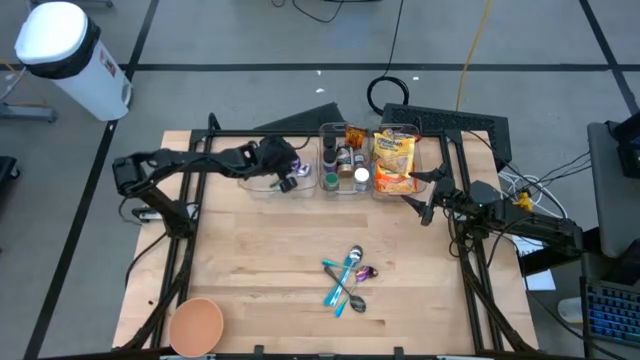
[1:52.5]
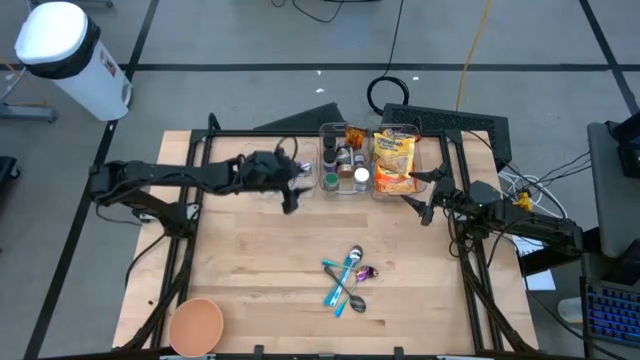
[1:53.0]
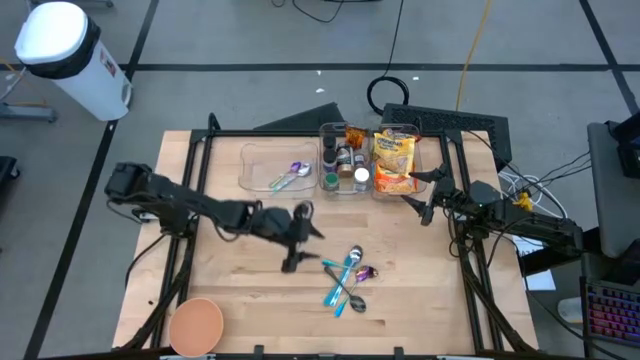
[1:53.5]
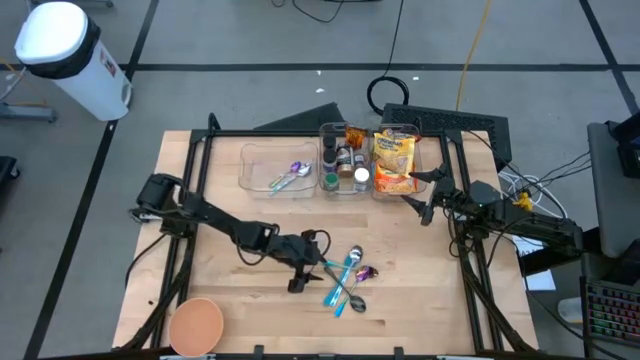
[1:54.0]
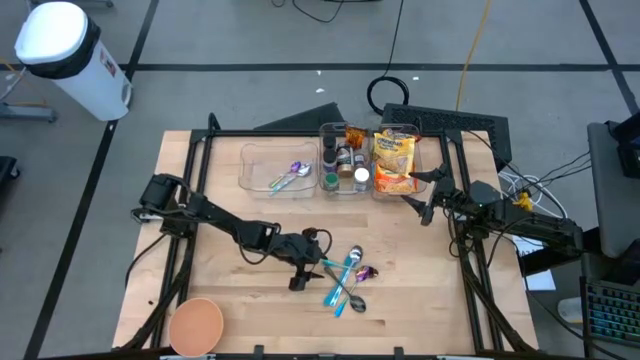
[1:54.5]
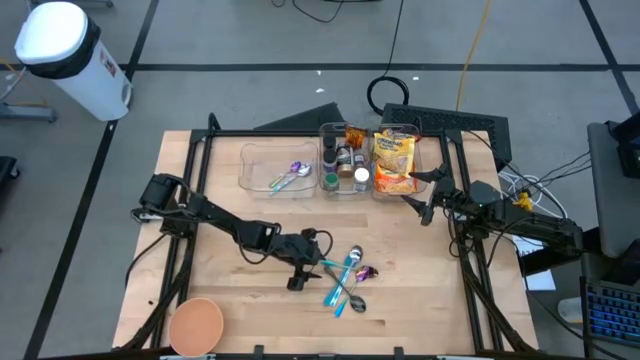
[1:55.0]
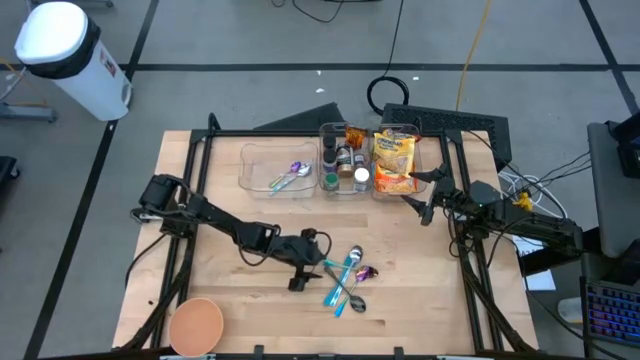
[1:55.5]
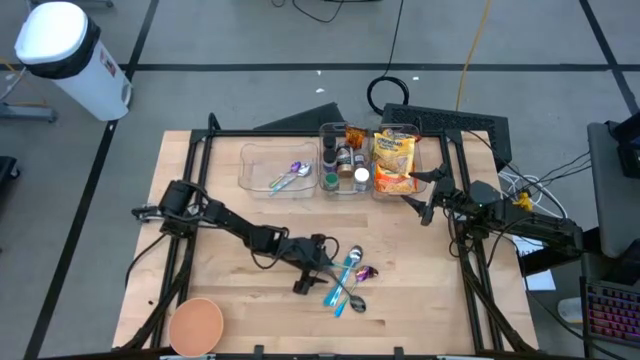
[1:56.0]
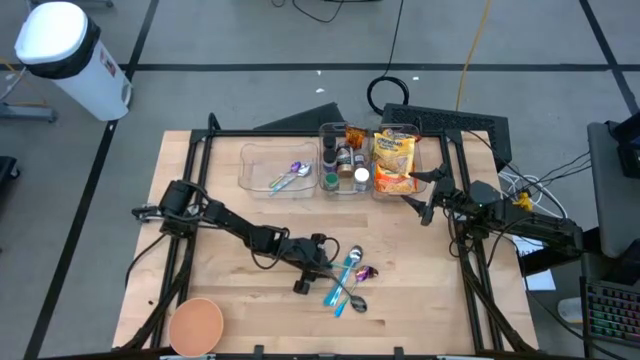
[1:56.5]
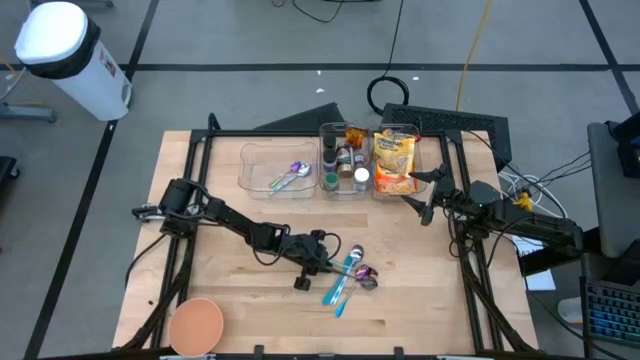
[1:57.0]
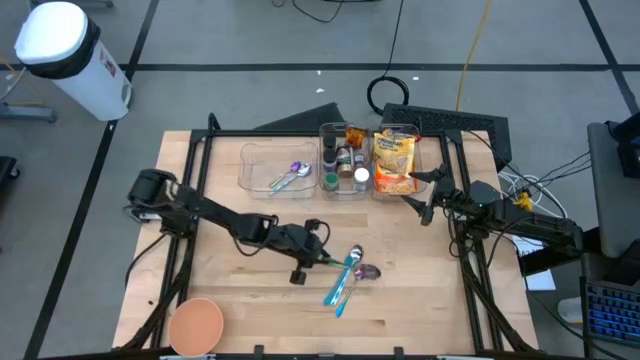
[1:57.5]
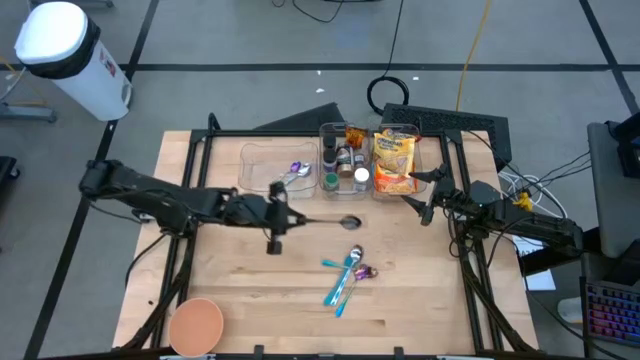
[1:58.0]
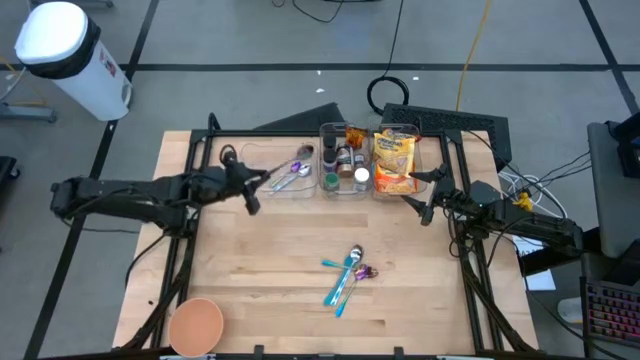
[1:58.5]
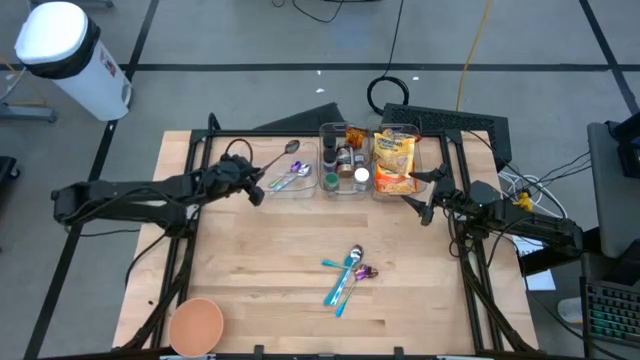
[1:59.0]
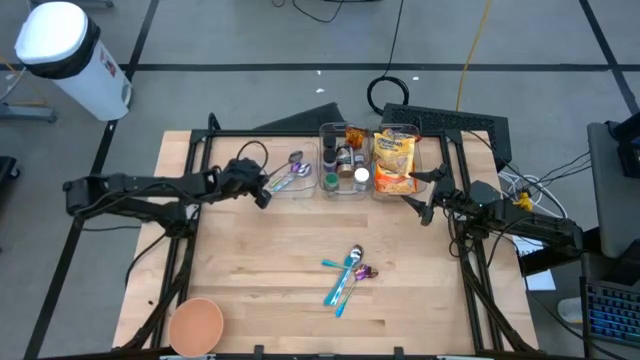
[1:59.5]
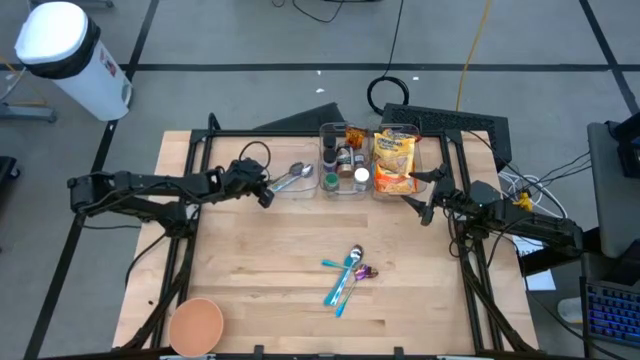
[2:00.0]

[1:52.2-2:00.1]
Task: Pick & Place Food Item
Put the black spoon into the left transparent bin

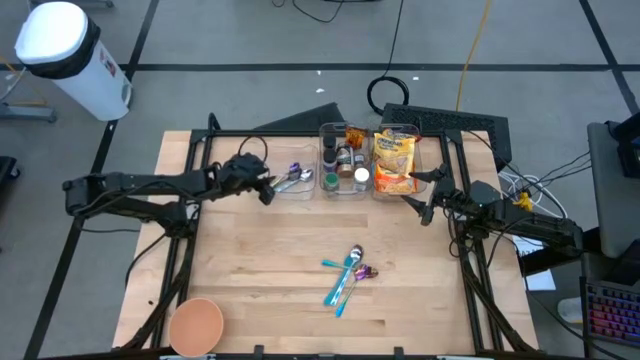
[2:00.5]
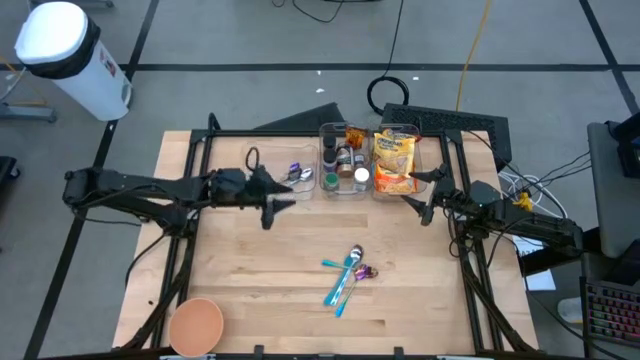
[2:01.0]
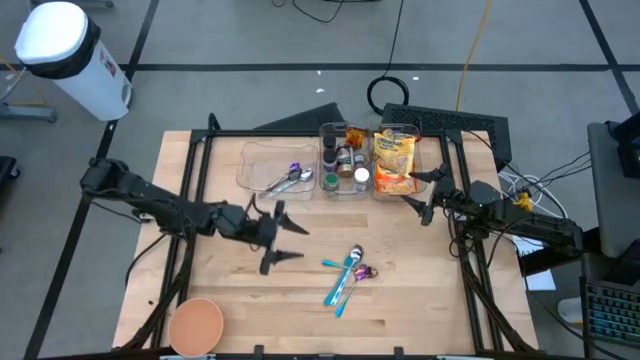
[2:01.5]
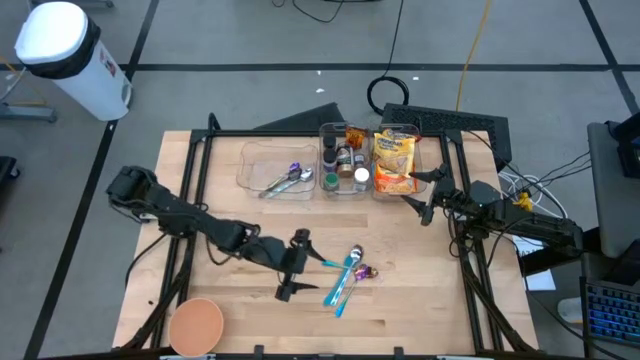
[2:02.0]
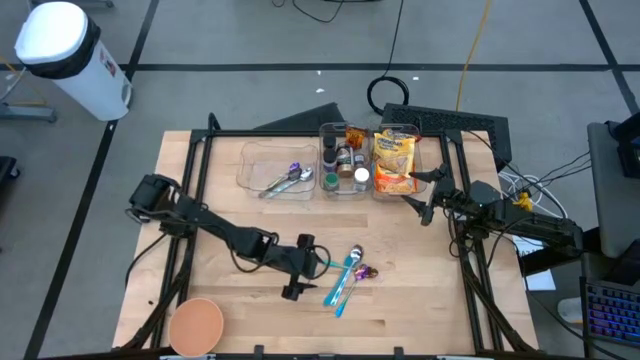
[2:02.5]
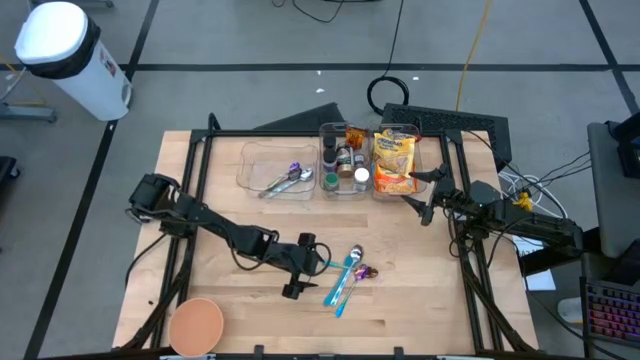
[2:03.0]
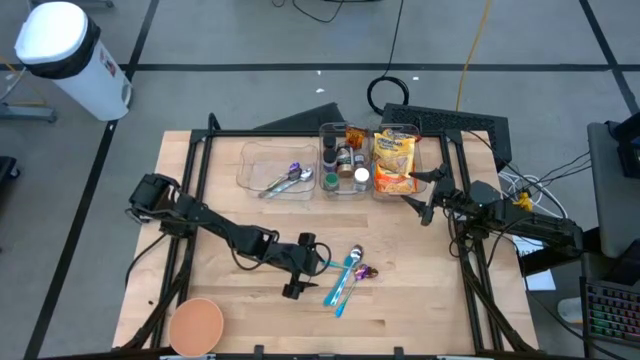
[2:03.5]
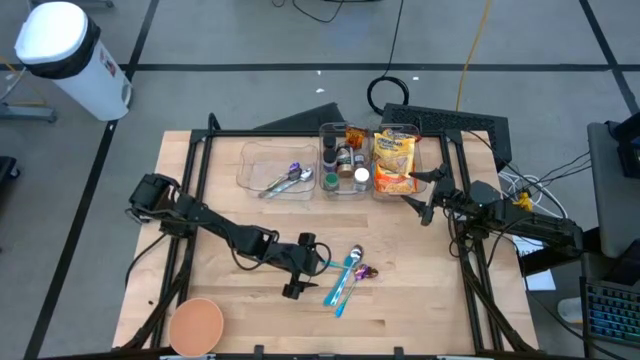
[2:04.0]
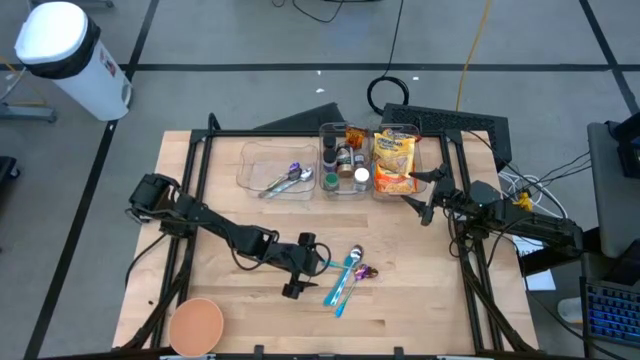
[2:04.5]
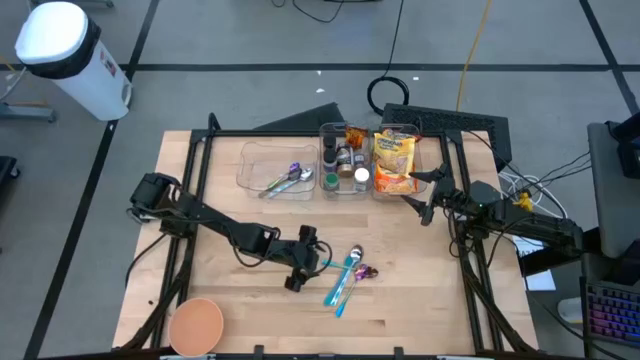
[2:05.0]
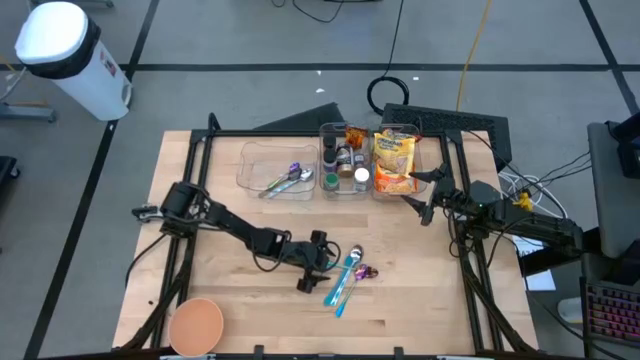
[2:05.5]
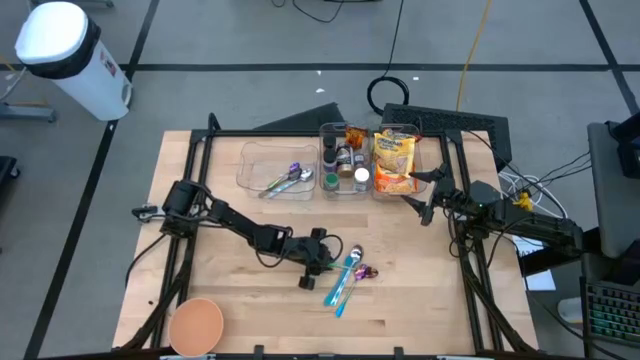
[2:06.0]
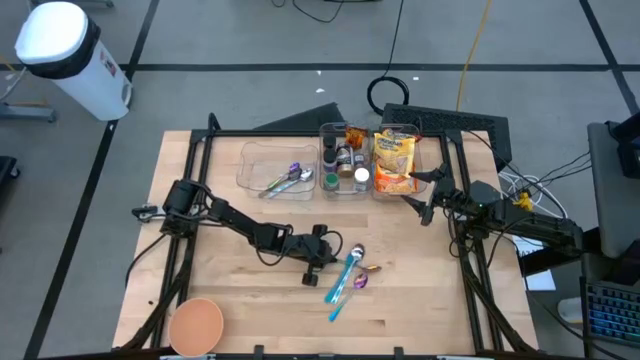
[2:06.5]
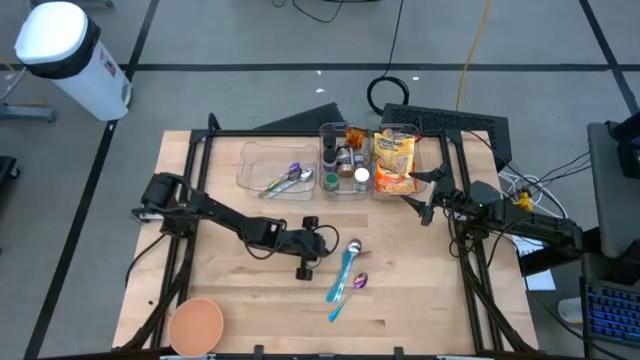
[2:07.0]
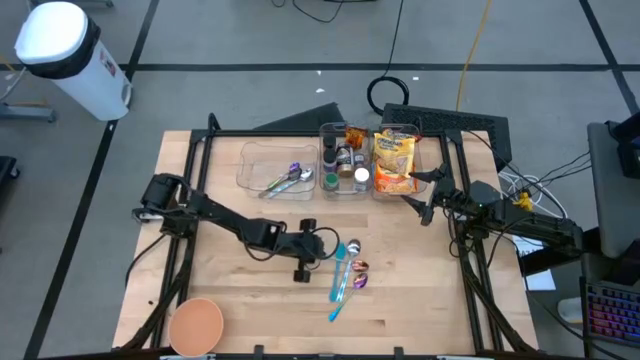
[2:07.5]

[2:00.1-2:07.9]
Put the blue and violet spoon into the left transparent bin

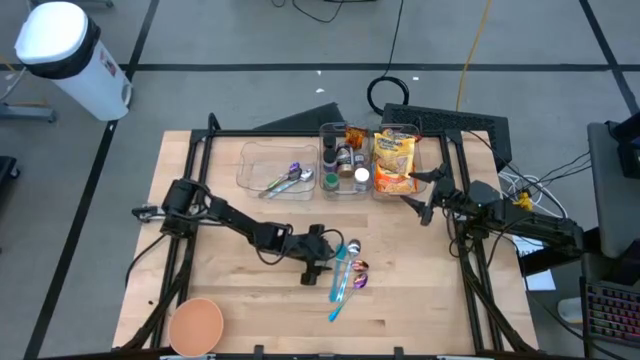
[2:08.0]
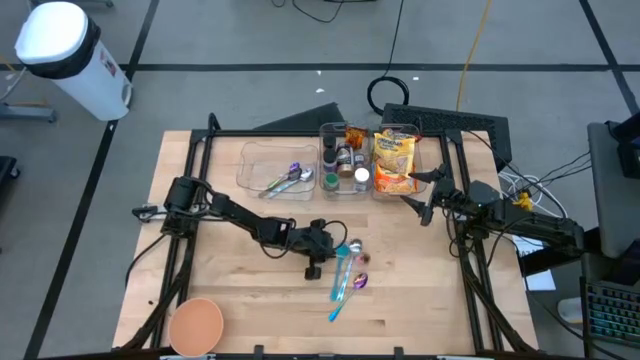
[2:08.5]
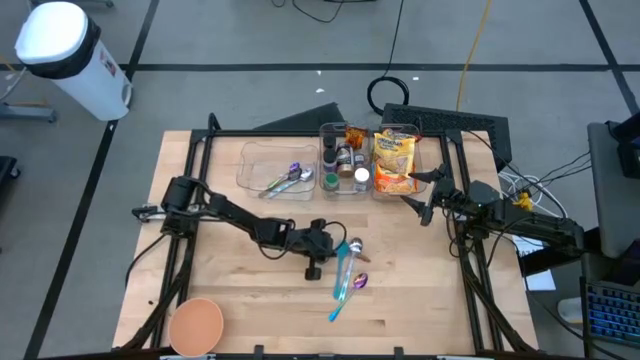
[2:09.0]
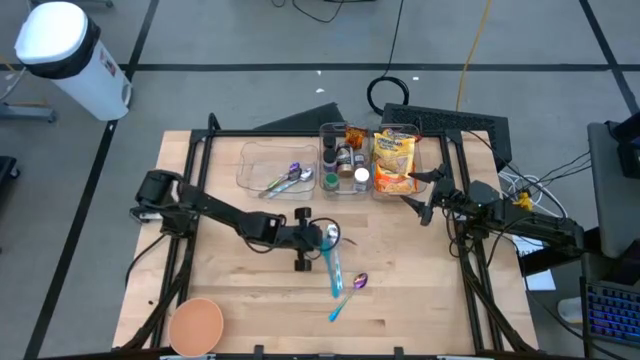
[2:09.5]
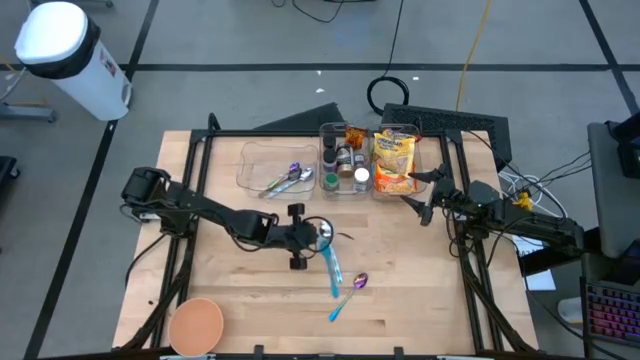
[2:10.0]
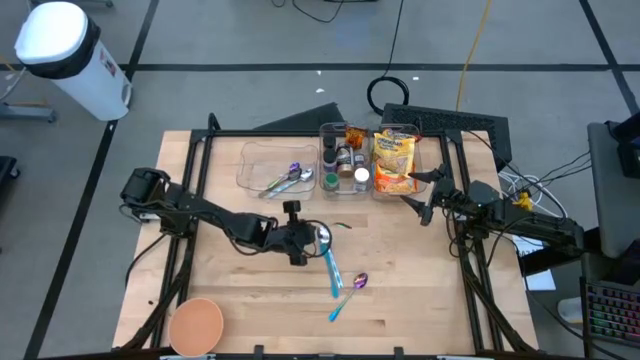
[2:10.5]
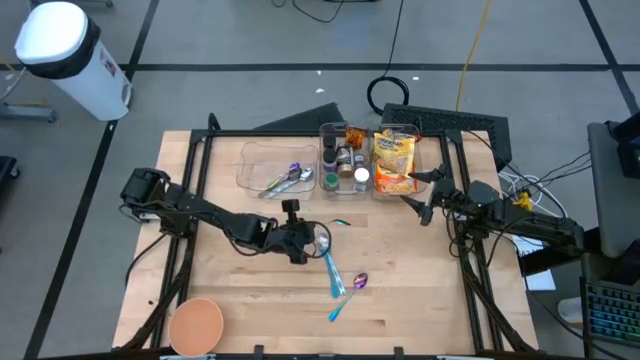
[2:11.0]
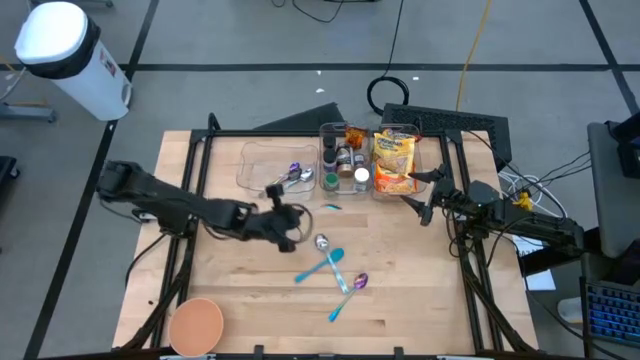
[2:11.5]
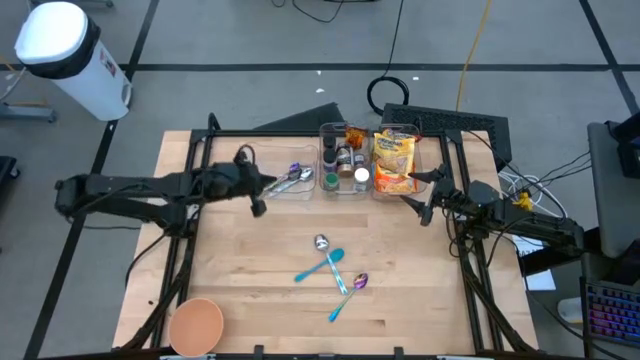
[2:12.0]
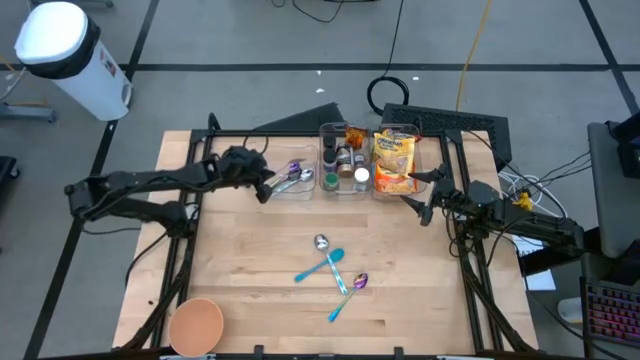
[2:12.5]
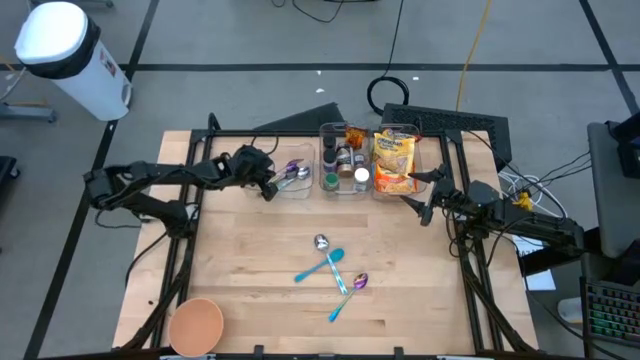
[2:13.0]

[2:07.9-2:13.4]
Put the blue and violet spoon into the left transparent bin
